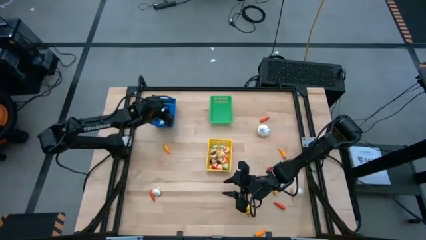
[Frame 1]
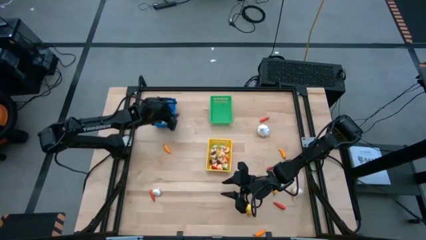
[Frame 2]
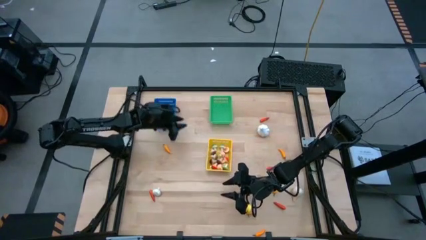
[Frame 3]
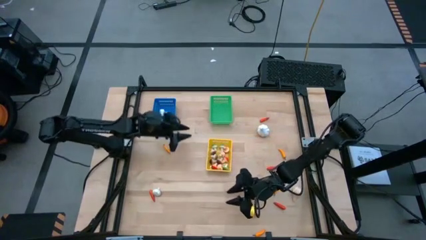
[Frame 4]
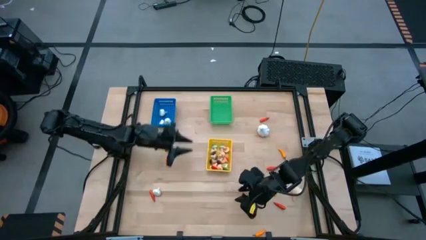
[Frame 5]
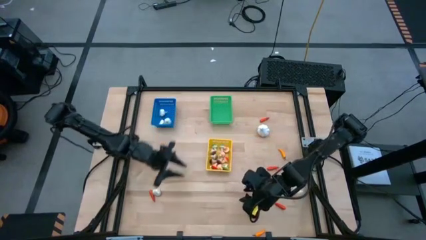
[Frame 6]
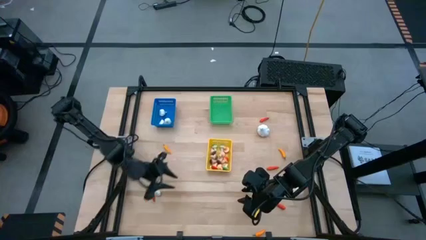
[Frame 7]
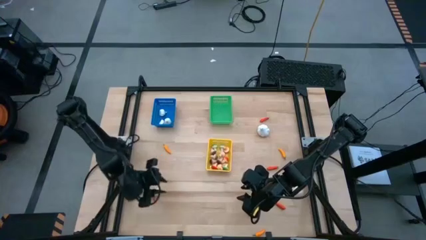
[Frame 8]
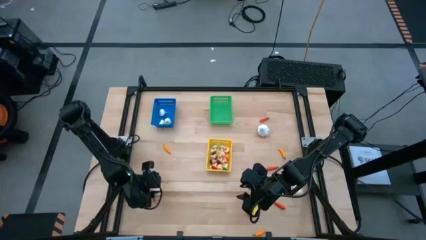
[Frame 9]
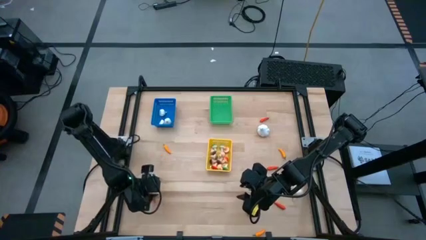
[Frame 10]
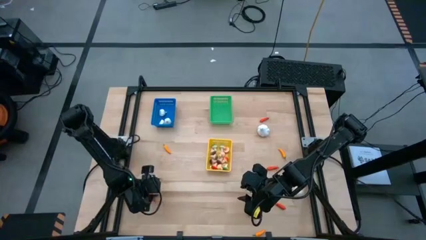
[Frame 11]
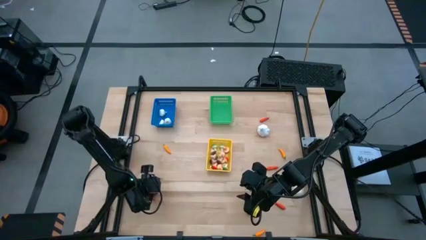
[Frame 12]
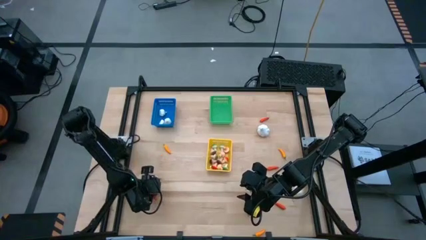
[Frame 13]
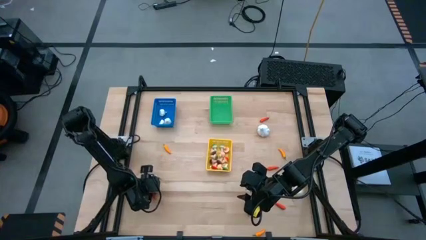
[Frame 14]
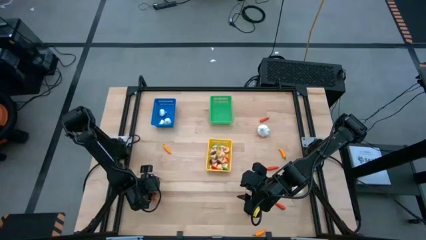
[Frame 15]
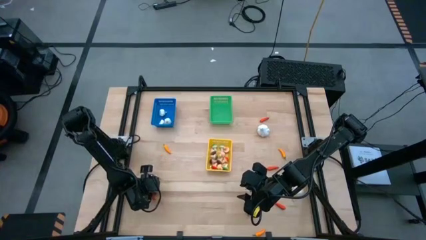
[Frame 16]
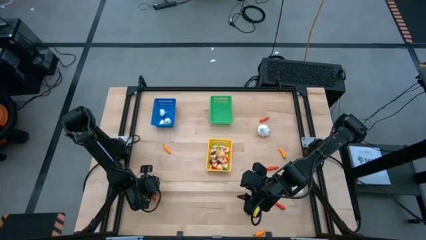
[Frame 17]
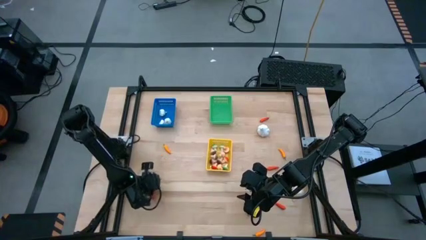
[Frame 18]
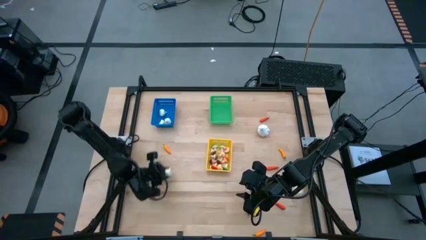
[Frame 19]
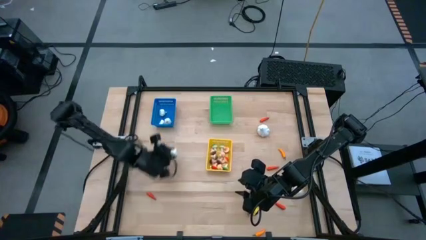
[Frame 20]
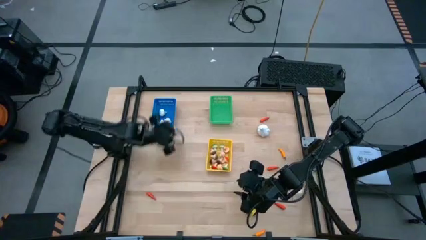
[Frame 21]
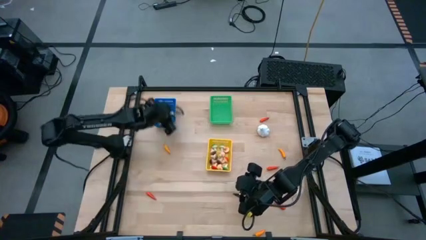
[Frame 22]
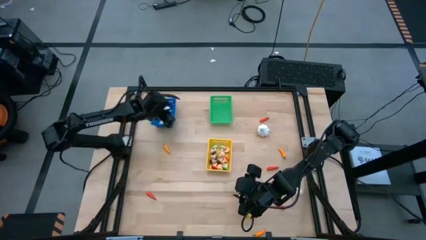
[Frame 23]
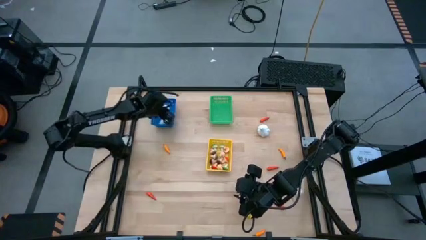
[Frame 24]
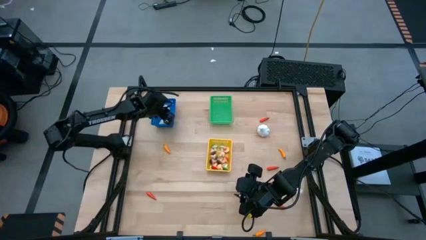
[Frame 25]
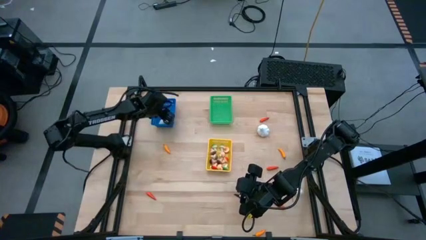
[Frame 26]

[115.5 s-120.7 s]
Task: Sort produce into baskets
Put the white garlic into the blue bin

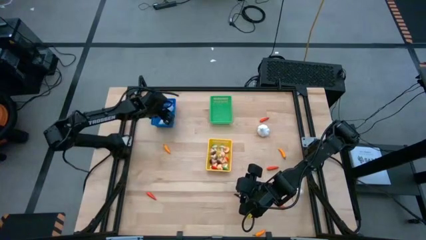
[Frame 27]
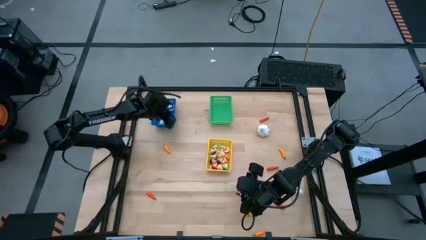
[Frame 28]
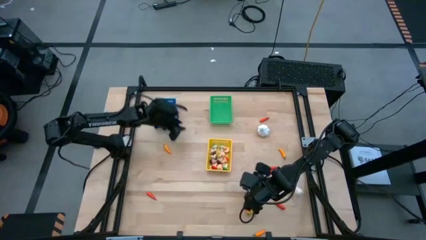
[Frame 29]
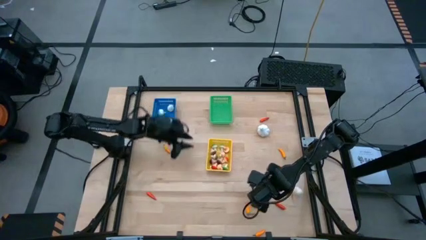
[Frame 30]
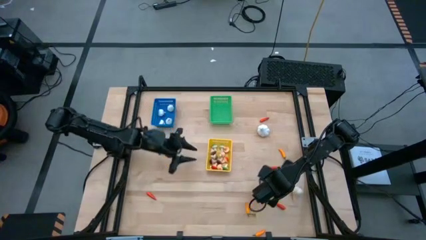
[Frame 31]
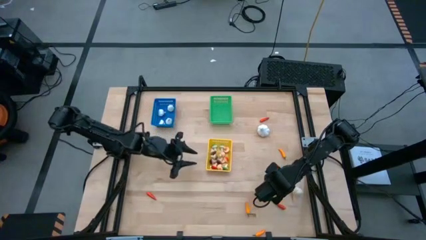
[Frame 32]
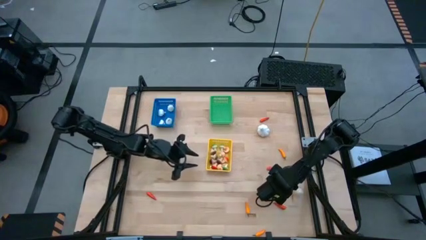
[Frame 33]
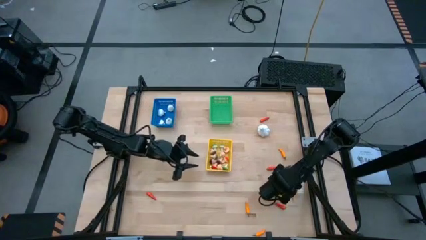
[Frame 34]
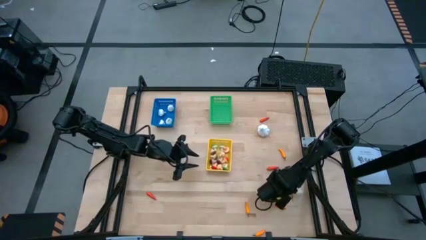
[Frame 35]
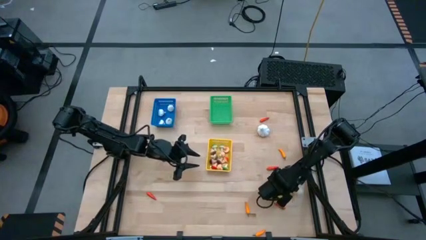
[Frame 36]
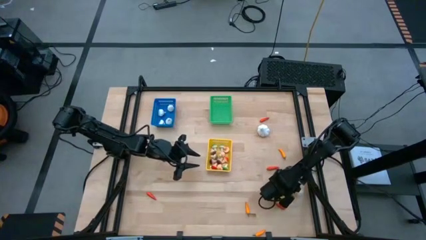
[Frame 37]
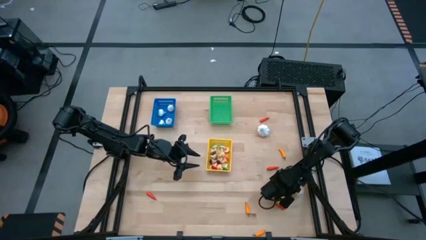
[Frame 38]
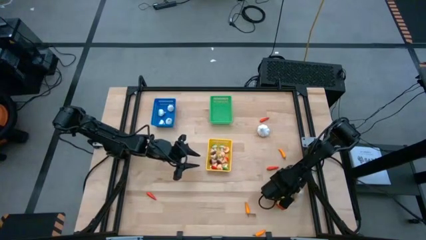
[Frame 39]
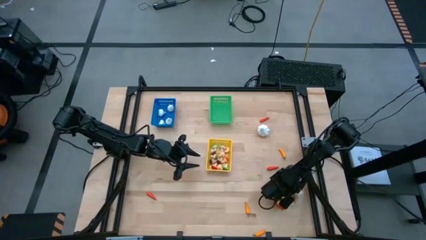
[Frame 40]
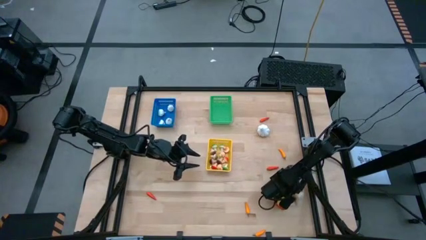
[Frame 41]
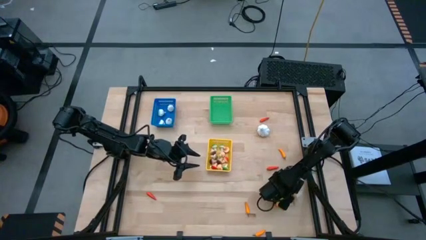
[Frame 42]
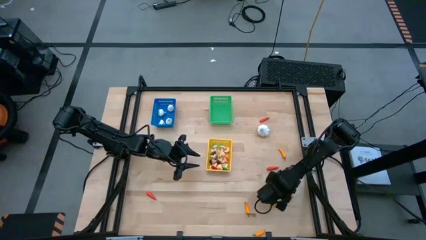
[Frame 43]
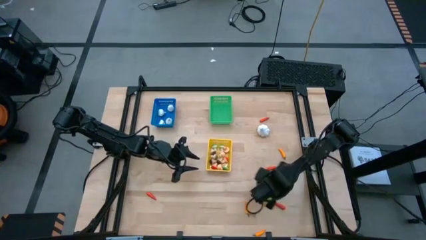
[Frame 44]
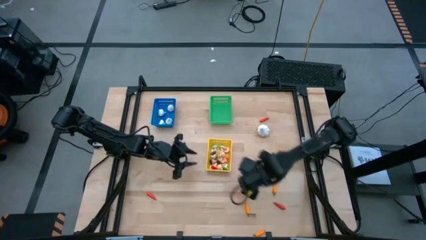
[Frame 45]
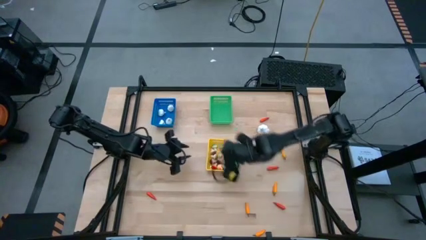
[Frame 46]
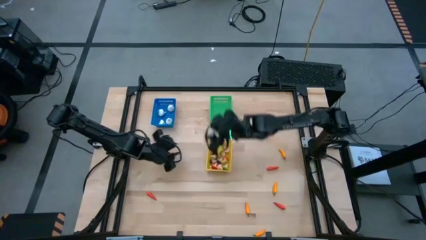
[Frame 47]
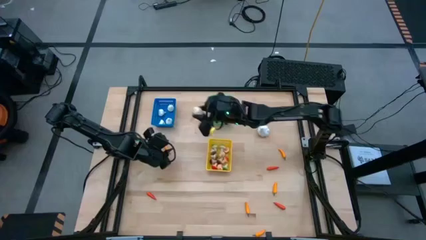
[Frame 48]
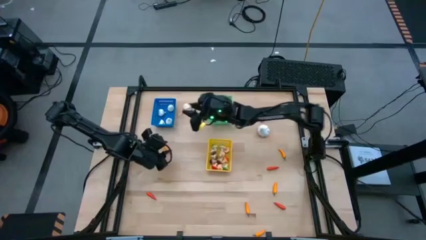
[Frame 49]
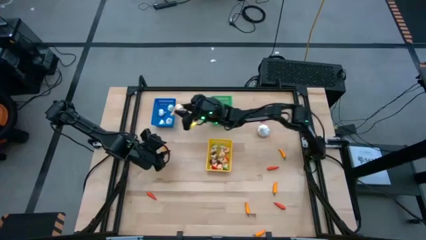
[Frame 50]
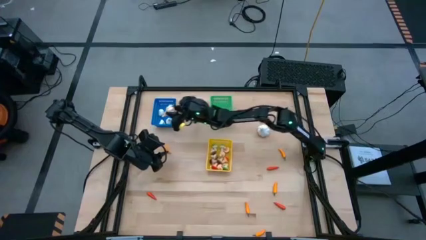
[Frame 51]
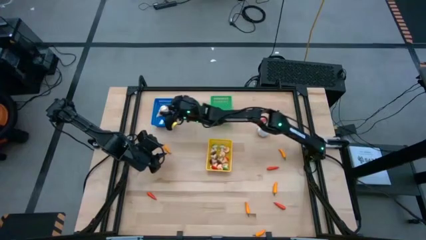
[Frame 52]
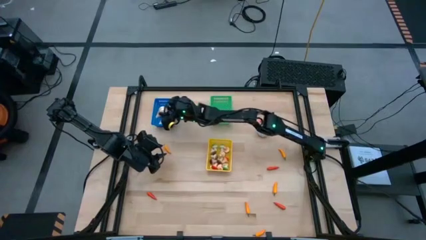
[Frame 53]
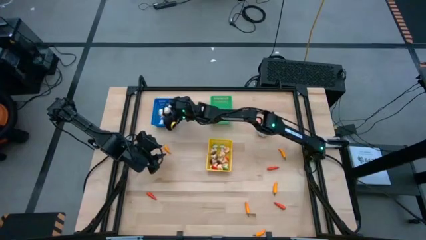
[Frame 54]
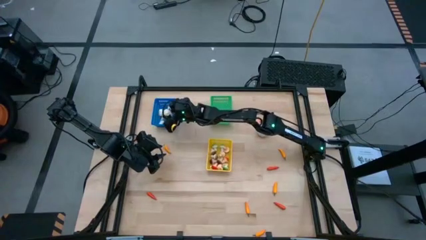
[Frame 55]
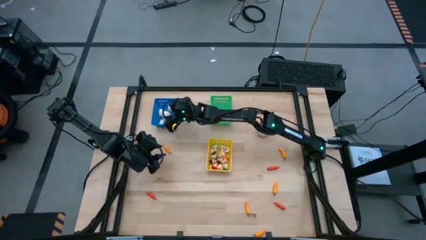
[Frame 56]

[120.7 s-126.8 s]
Put the white garlic into the blue bin

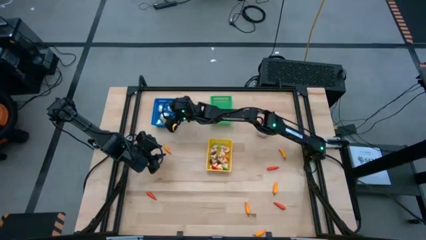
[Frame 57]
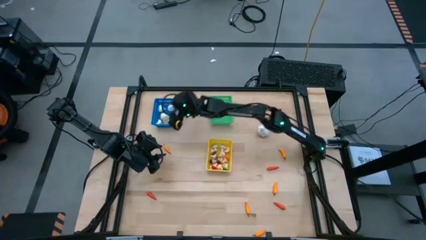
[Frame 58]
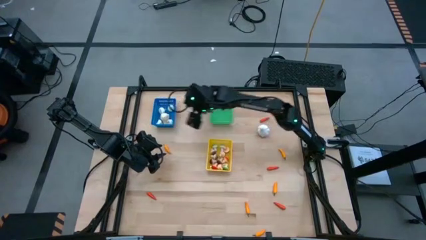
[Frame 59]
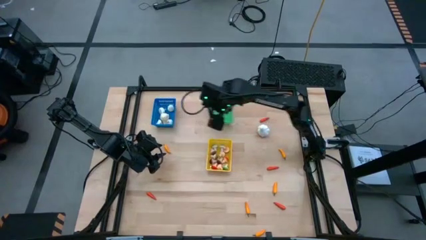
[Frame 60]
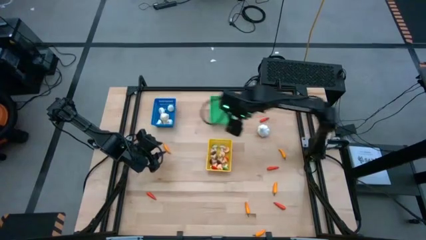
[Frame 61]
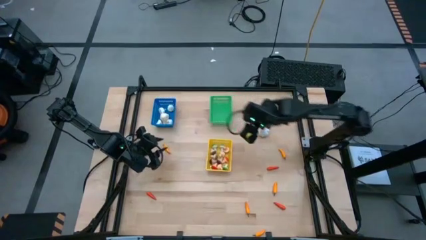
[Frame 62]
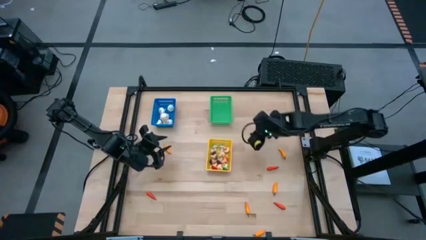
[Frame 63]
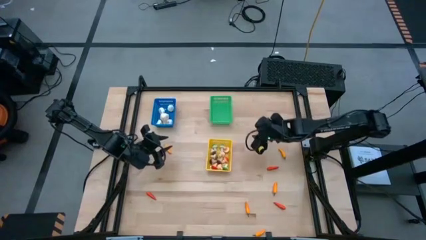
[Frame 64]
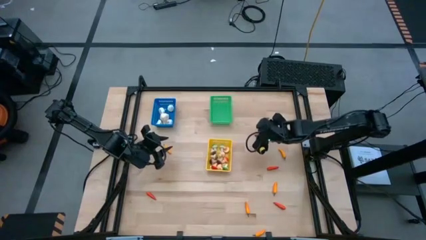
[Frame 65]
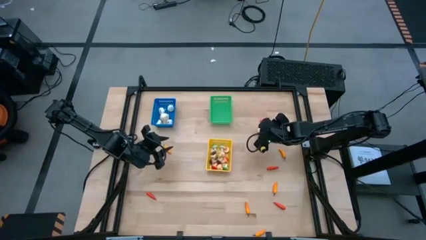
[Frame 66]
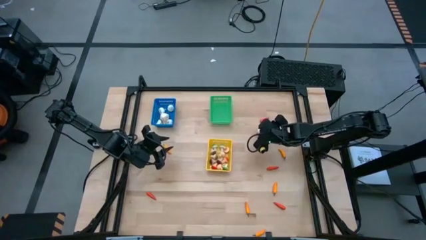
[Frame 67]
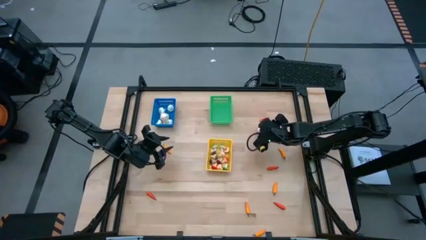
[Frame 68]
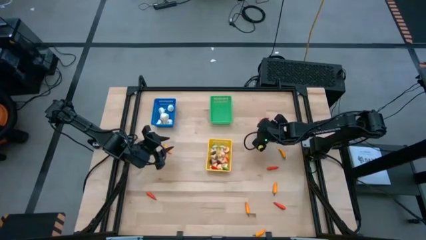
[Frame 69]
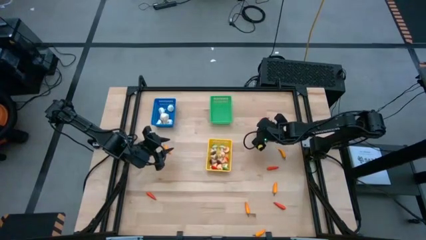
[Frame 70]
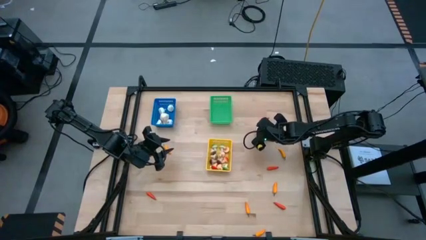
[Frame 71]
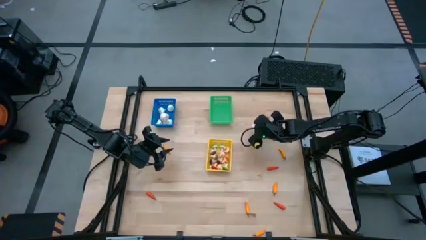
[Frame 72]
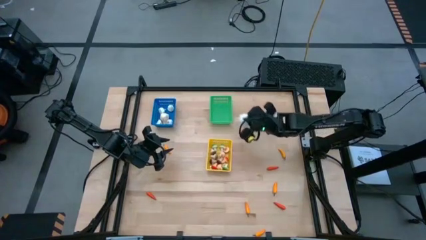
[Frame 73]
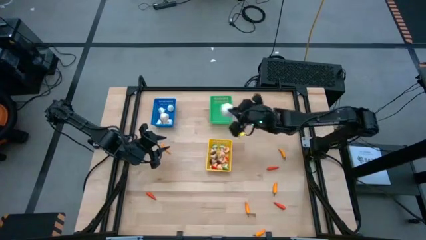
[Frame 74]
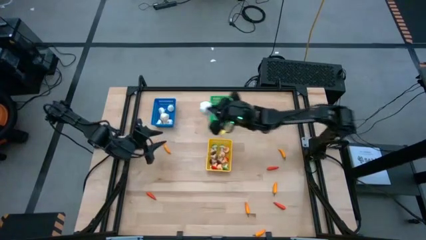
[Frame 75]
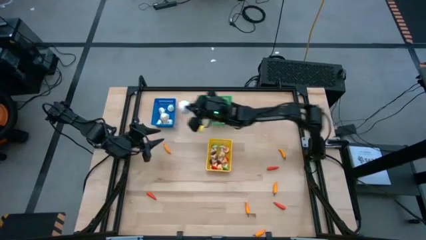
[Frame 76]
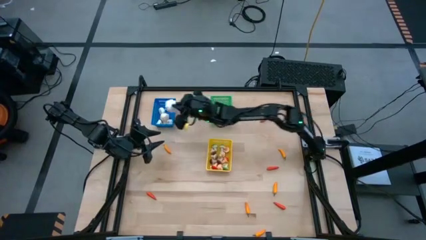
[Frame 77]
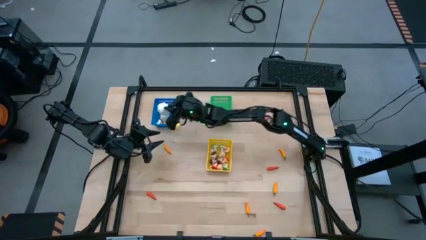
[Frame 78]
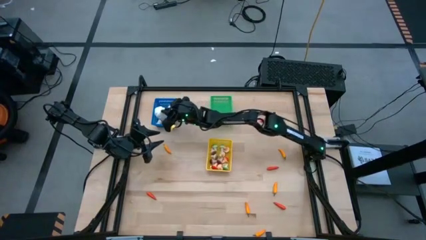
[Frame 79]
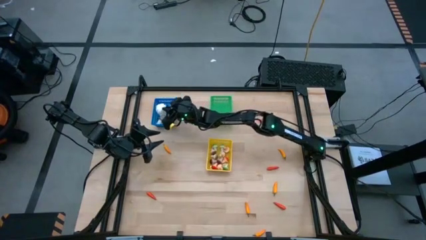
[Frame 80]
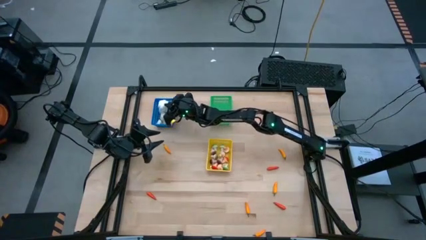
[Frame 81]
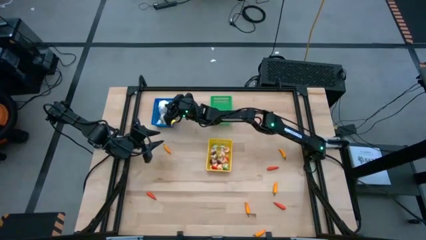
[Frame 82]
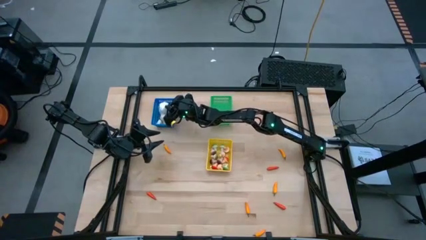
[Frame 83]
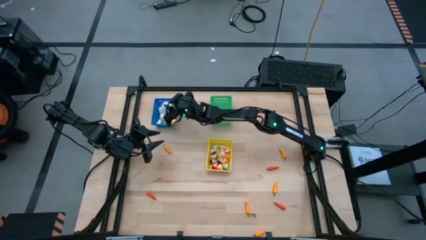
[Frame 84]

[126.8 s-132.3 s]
Put the white garlic into the blue bin
